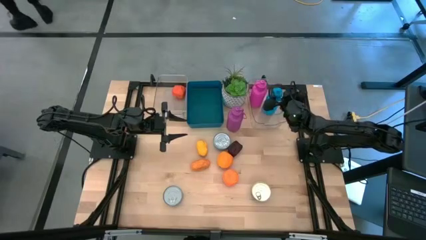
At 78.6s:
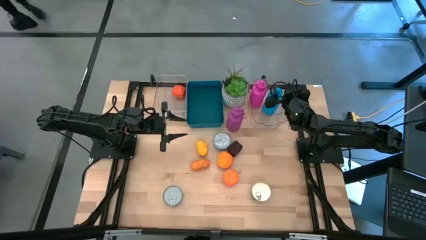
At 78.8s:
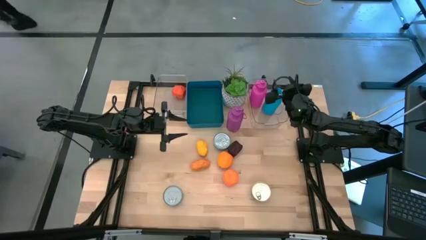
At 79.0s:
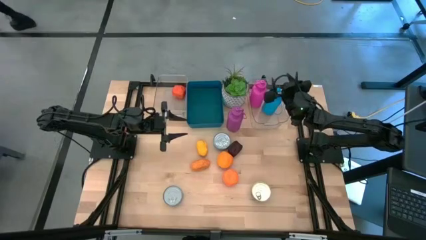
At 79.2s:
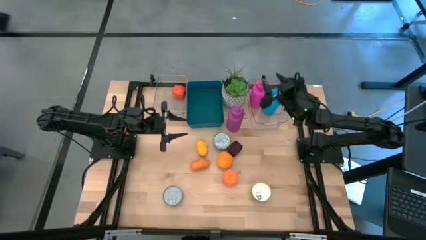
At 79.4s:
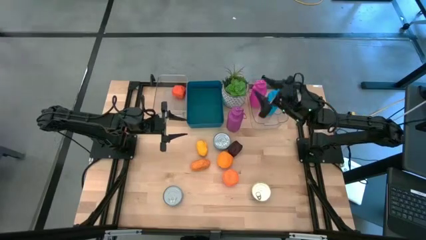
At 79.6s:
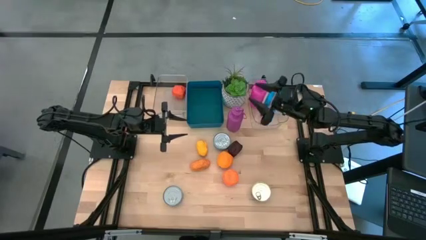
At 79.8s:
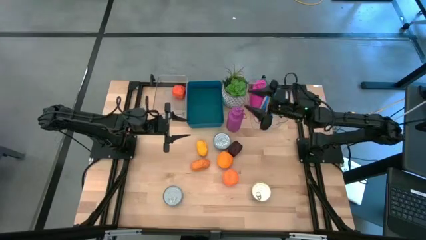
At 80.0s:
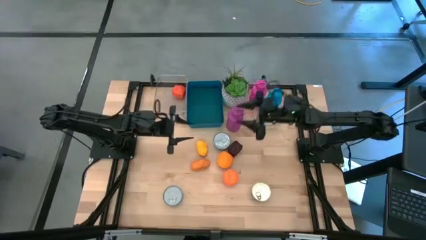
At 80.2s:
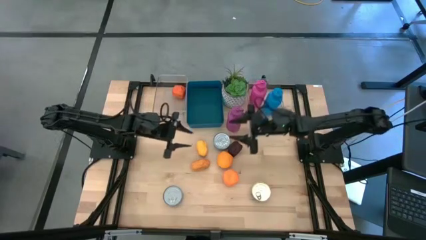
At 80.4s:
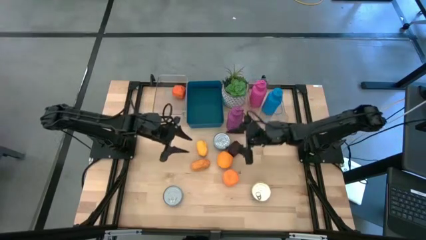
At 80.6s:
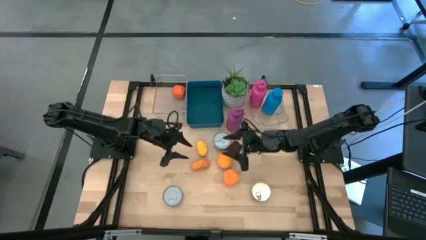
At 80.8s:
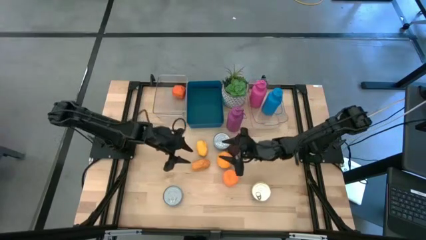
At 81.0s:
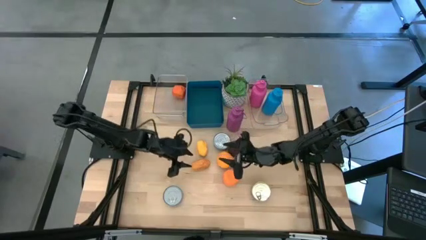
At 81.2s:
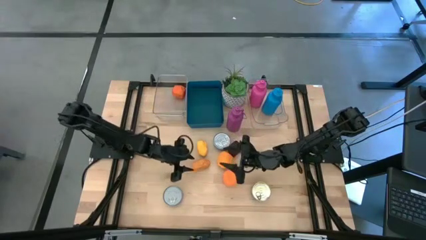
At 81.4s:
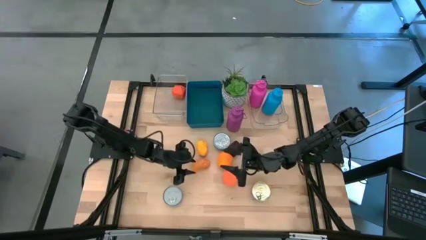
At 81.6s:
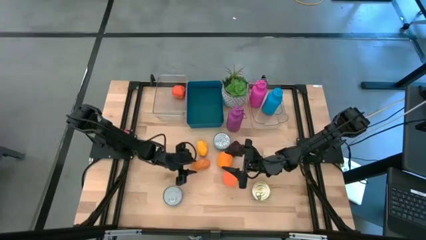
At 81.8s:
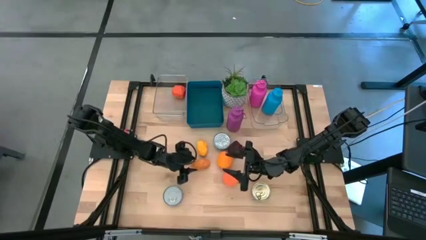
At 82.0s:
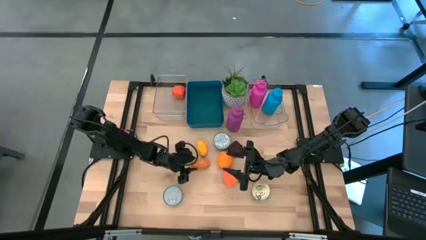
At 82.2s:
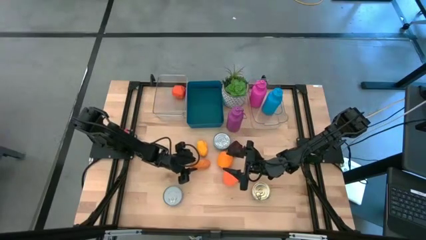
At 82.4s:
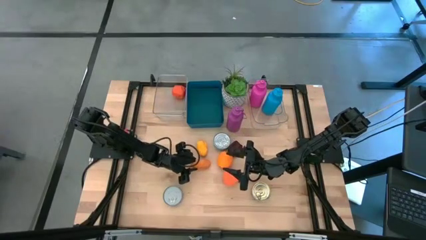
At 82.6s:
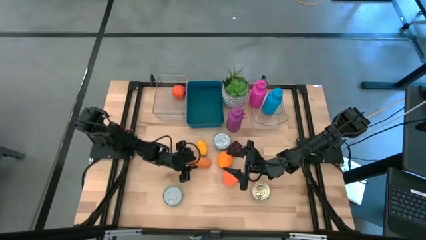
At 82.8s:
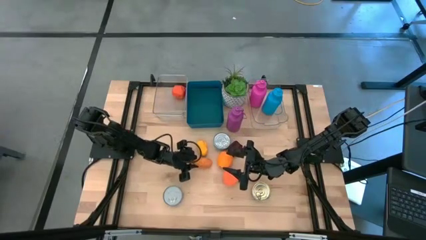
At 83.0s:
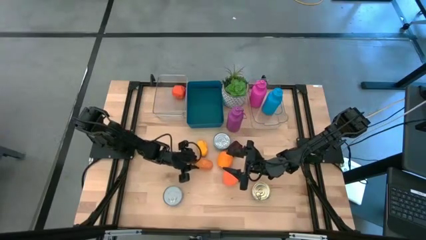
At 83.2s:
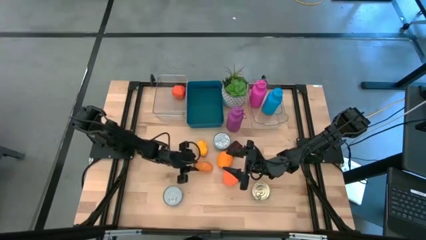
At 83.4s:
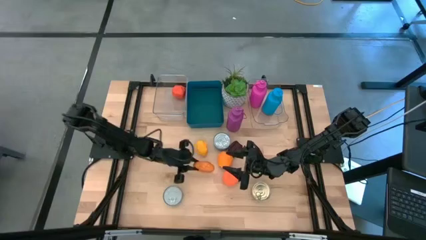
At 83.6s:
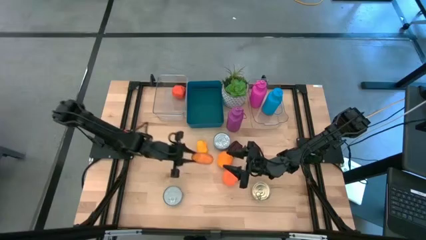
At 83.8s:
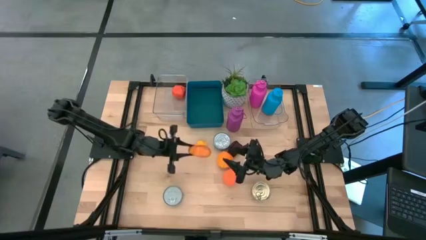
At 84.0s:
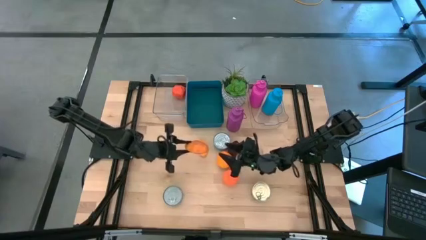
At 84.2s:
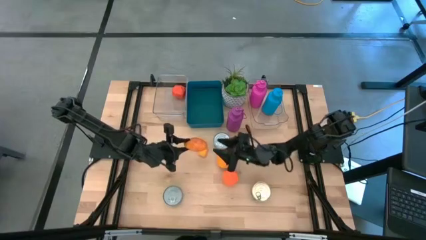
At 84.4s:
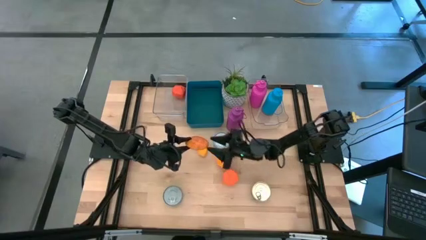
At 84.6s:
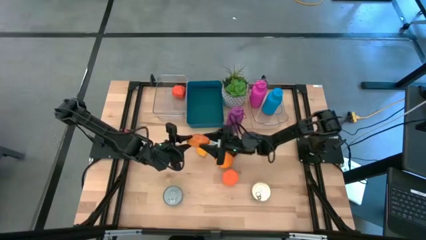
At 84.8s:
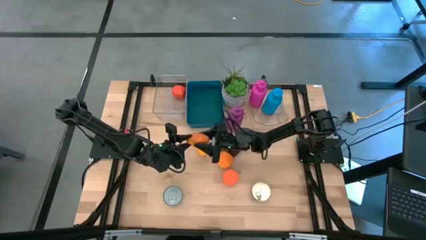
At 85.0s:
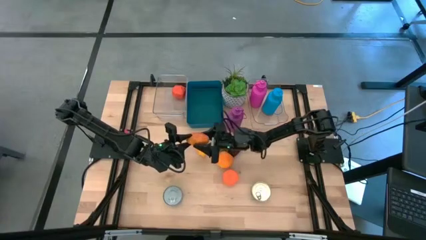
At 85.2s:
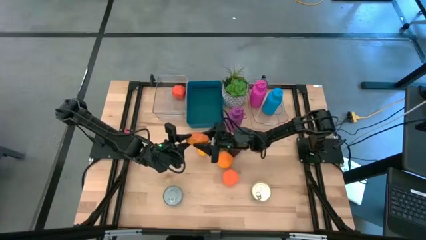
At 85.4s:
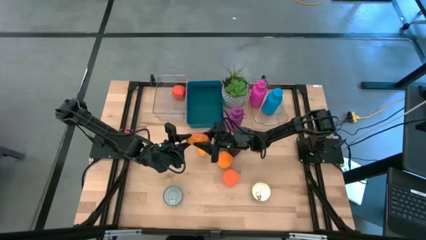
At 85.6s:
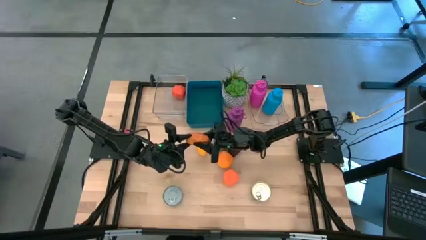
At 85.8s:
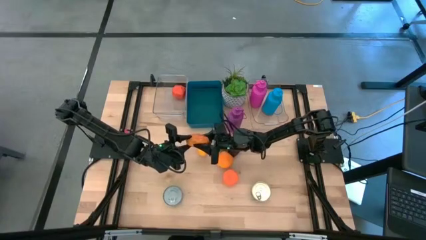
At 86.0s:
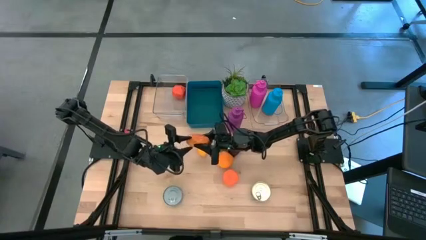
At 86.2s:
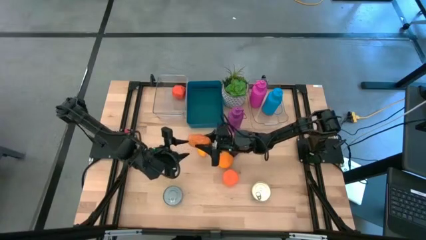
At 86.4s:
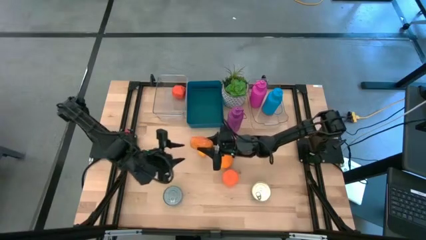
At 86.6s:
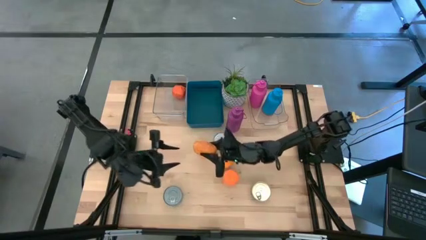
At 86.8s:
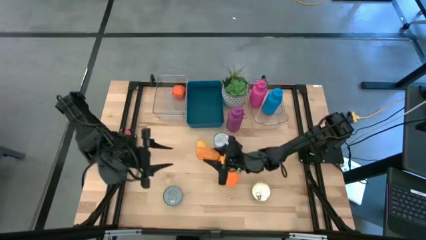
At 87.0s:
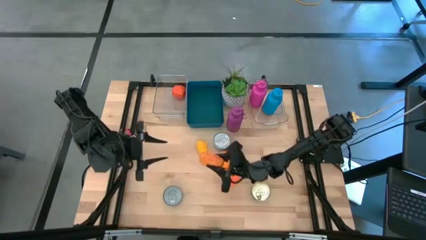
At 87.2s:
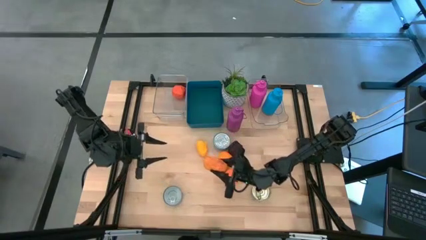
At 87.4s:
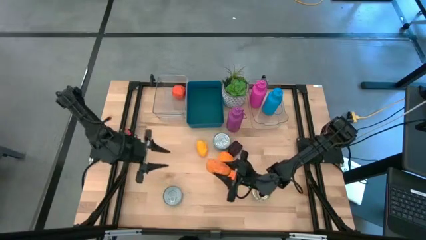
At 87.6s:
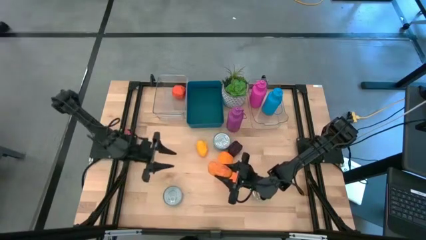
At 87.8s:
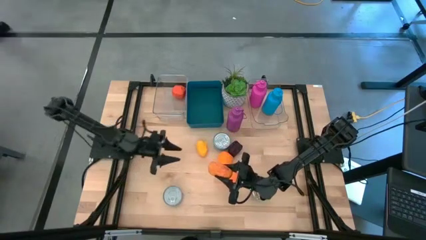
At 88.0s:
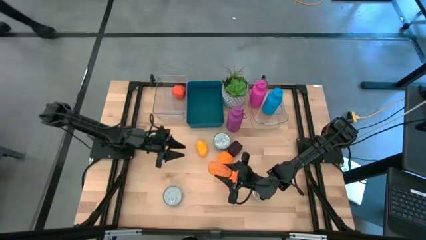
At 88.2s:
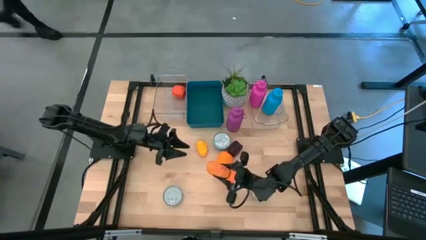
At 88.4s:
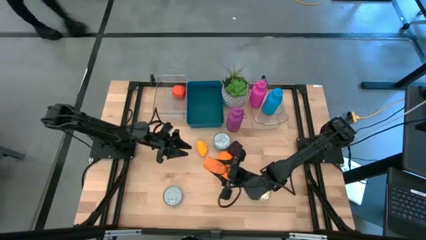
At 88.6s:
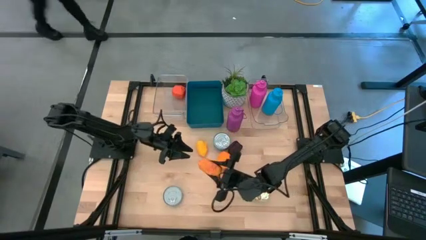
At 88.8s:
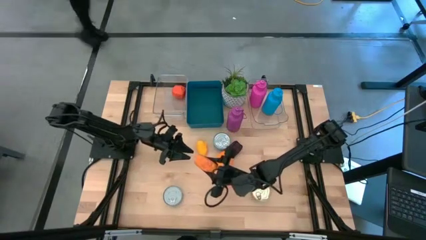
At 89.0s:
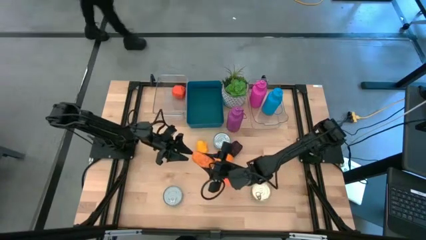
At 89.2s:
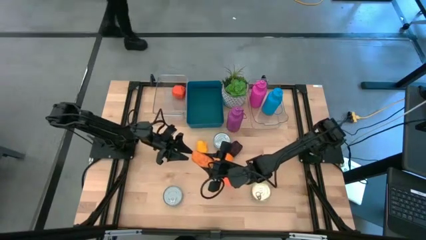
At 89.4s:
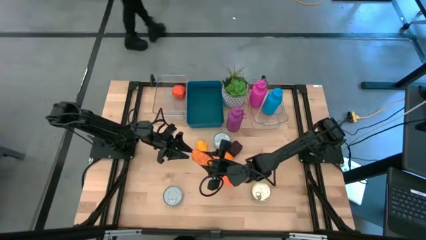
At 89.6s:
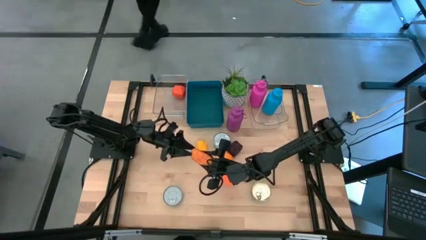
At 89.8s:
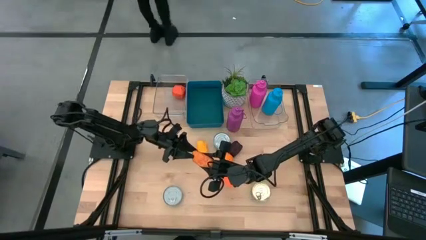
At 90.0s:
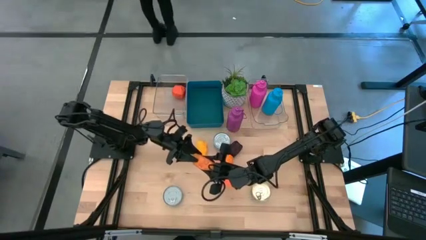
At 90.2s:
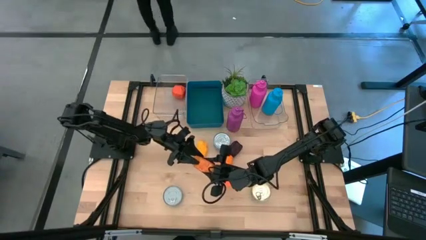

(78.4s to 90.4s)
Task: Pick & Place Food Item
Put the mango into the left transparent bin

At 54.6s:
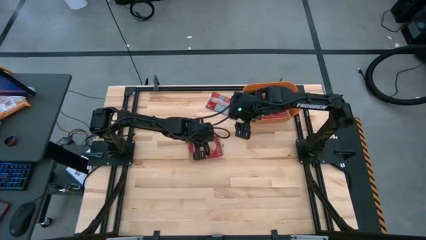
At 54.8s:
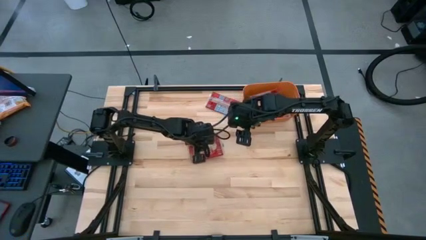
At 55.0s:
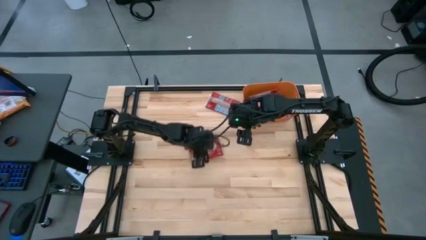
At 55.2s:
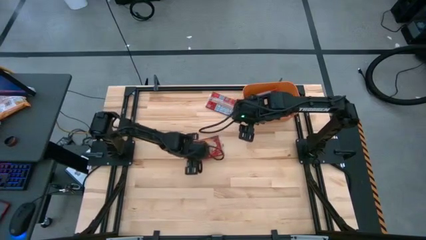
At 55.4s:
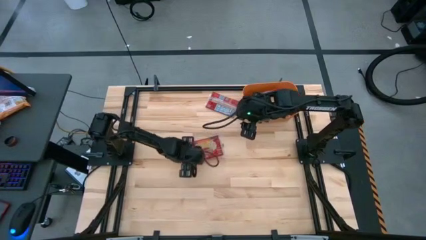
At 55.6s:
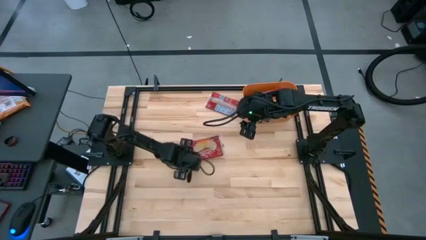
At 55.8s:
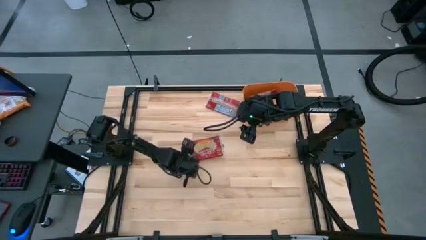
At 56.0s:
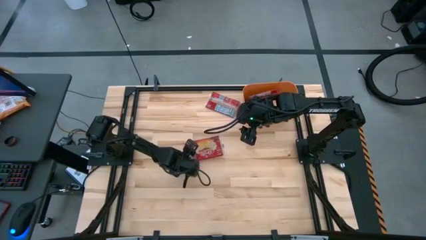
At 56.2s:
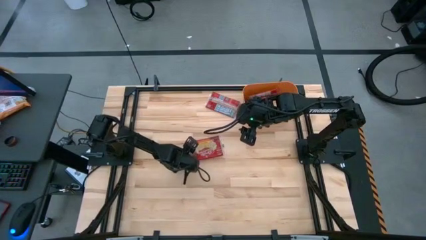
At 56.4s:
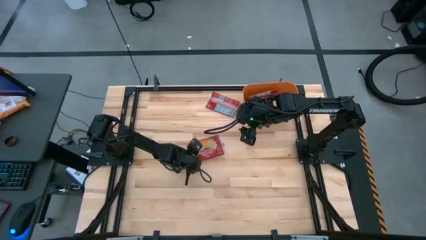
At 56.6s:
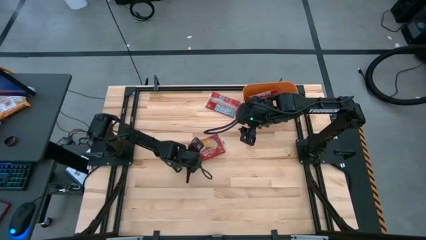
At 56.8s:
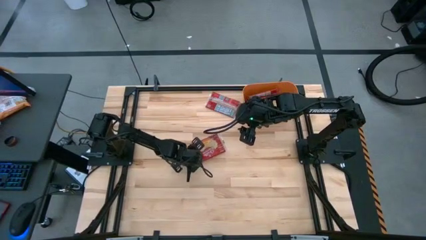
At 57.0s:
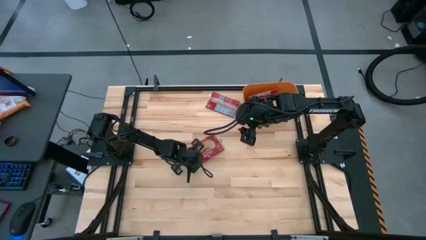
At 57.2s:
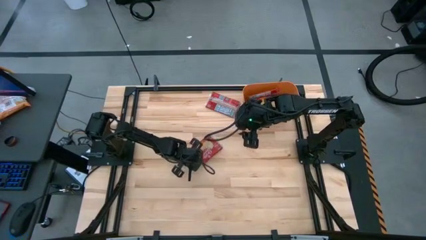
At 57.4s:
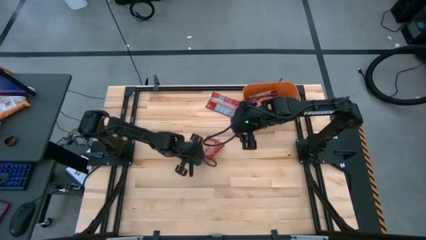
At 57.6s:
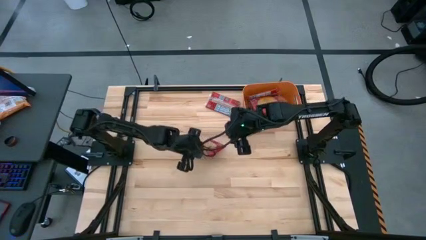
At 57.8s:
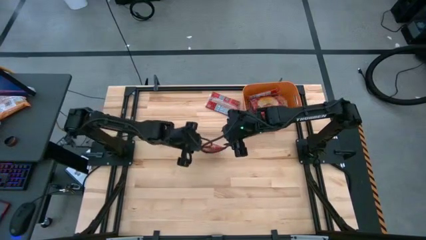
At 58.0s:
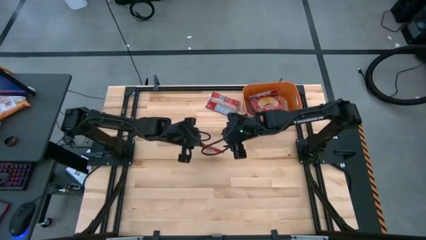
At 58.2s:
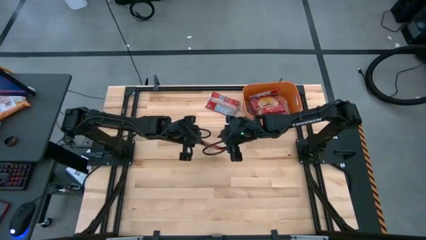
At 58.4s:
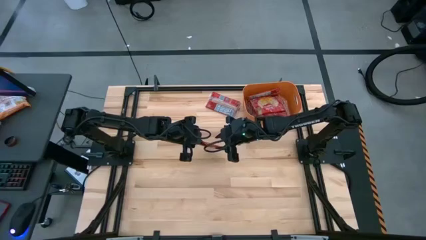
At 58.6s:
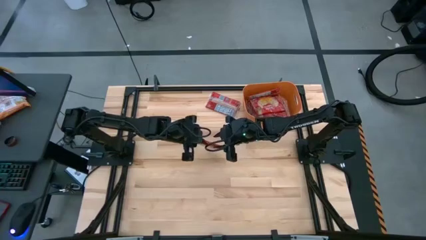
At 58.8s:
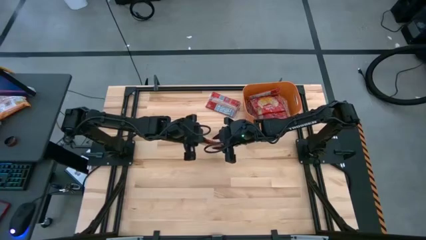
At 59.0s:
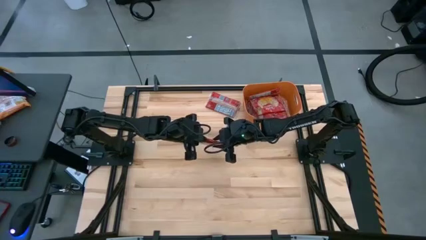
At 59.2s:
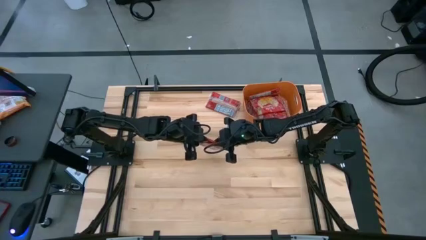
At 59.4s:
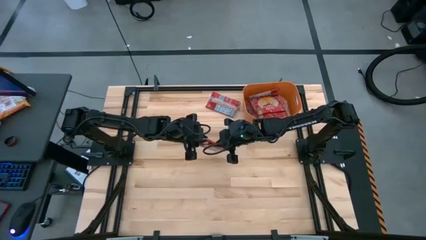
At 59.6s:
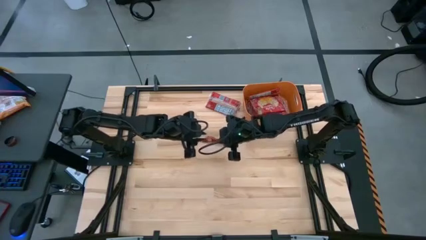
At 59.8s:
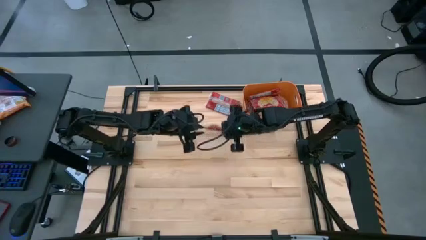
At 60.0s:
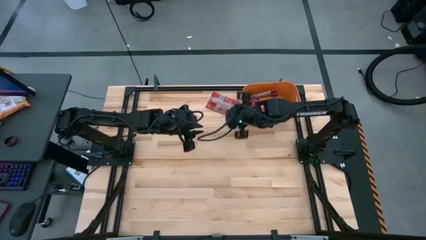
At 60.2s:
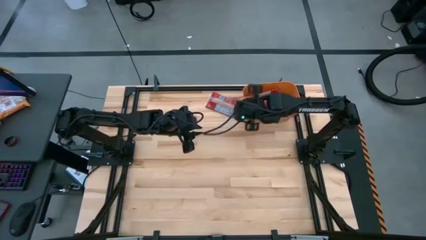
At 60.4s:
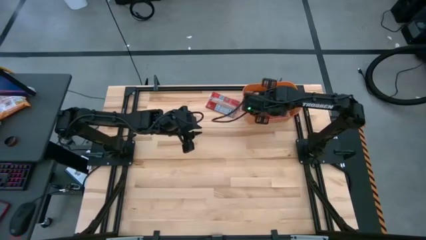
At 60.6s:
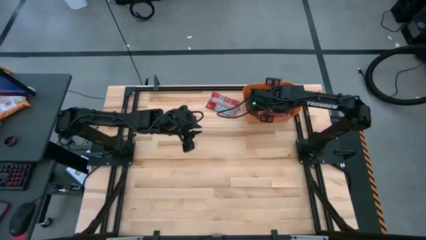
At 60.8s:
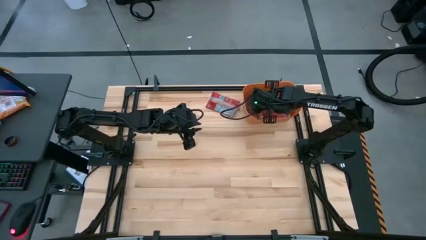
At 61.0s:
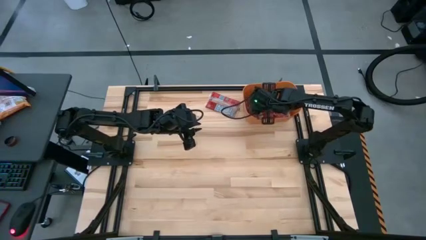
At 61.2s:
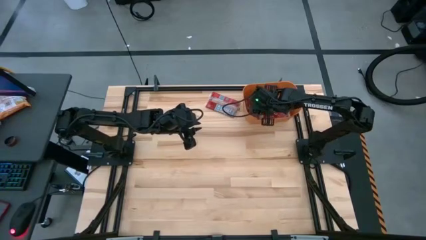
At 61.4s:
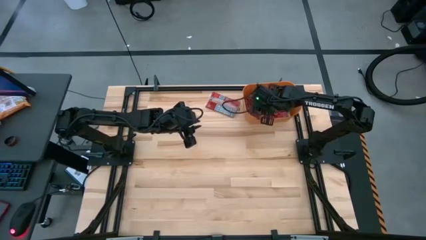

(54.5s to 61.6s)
Task: Sort popcorn bags into baskets
Put the red popcorn bag into the orange bin
